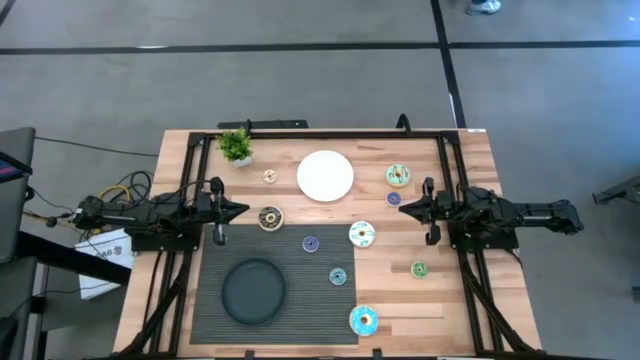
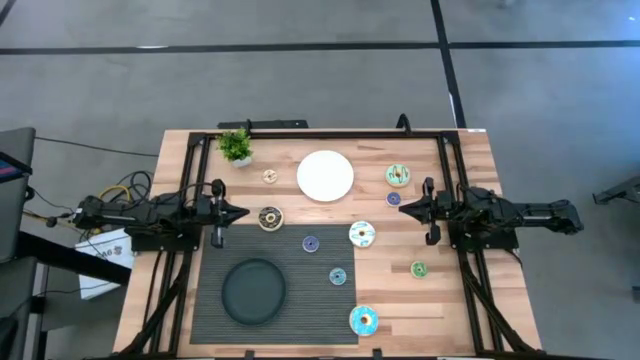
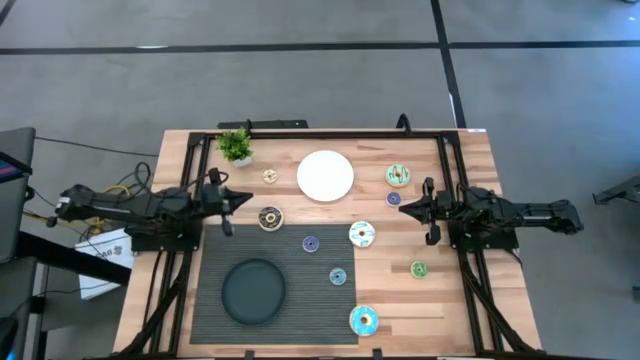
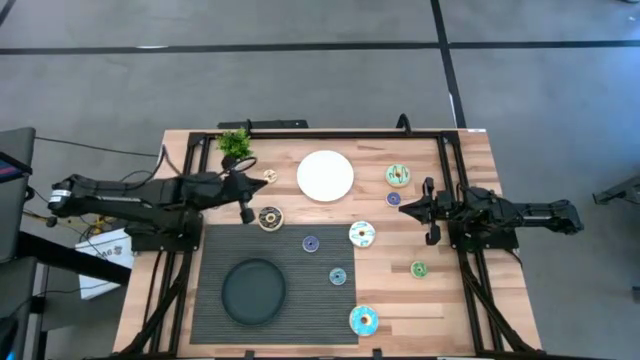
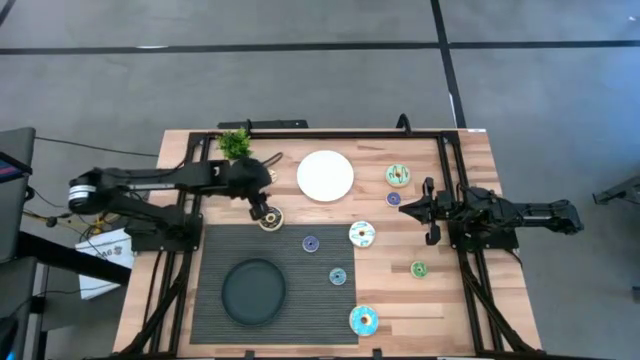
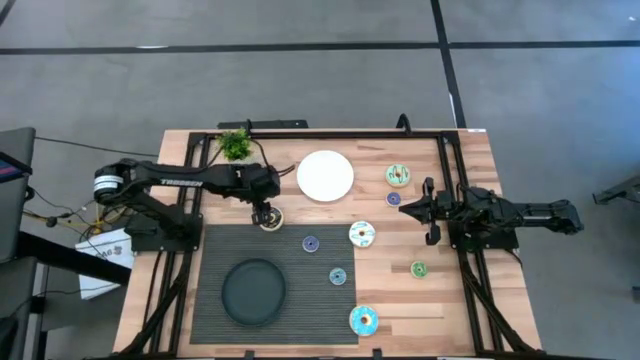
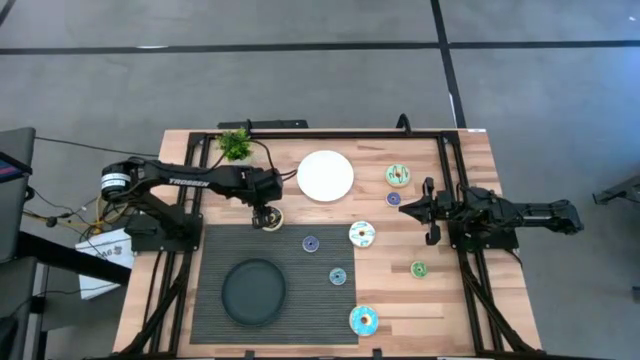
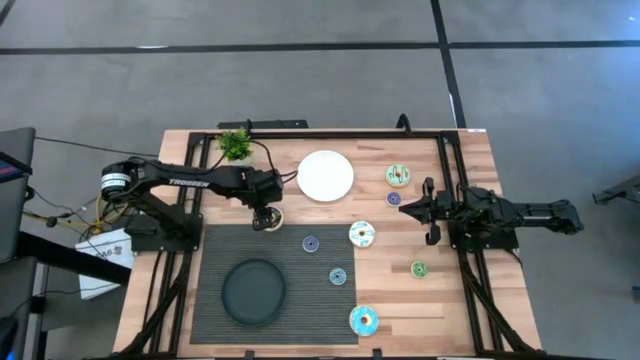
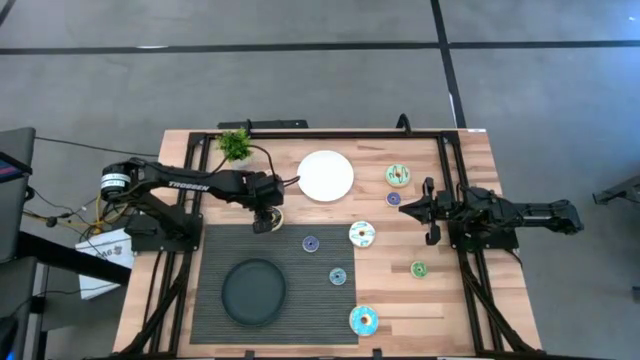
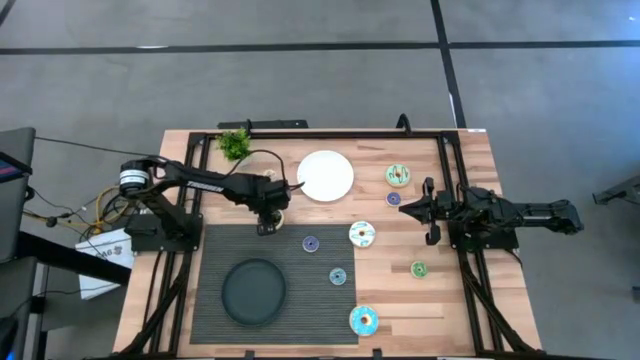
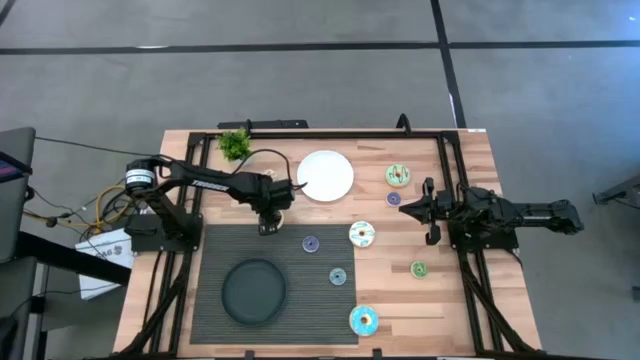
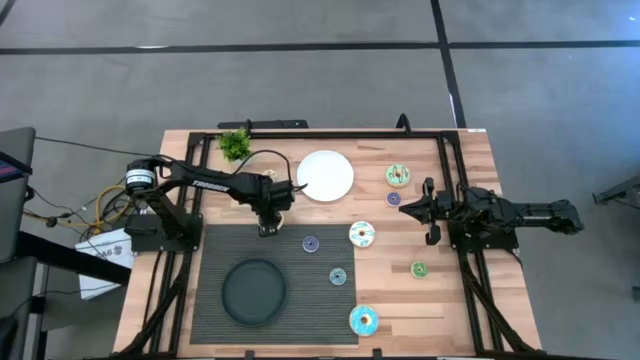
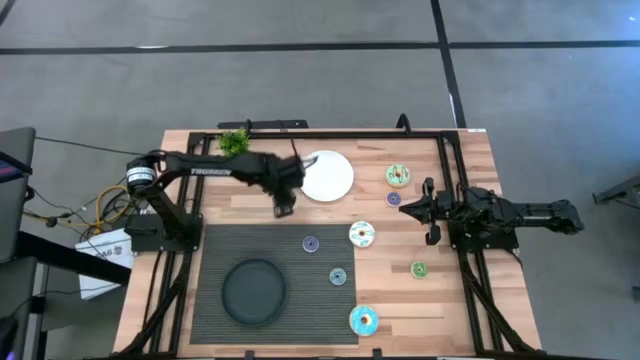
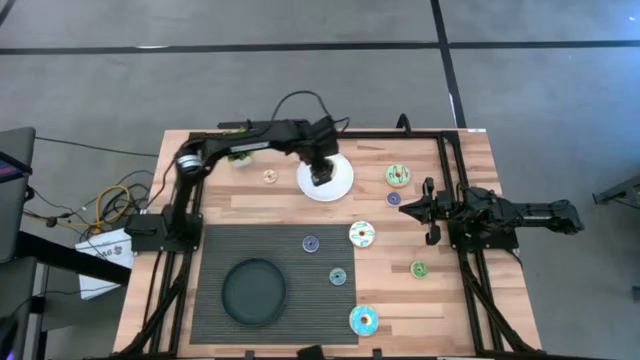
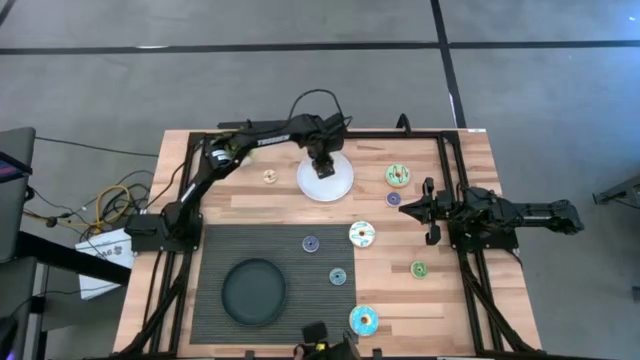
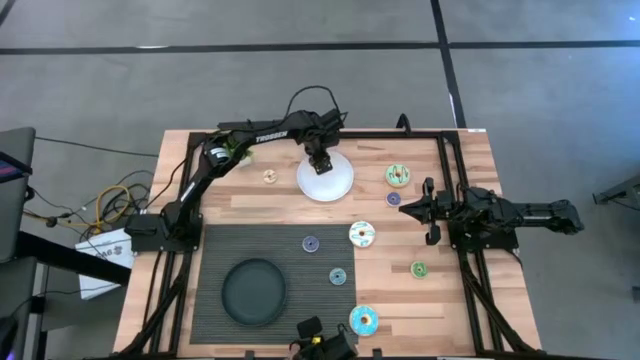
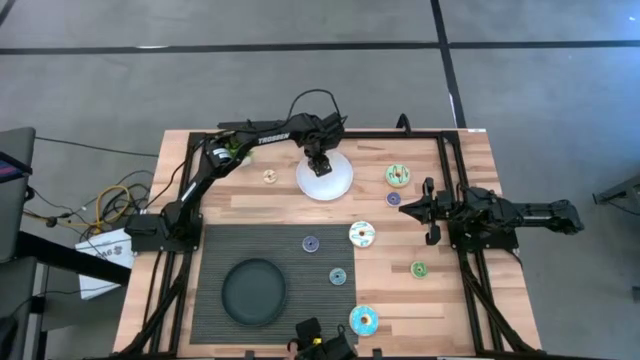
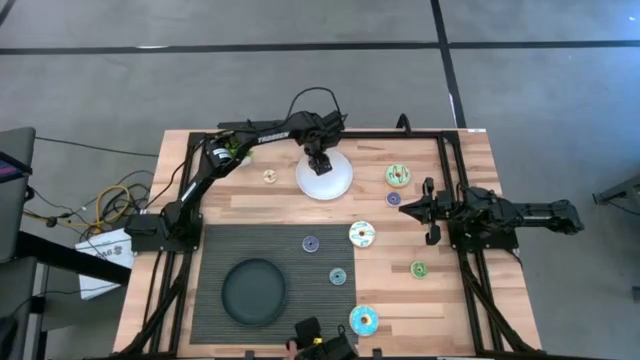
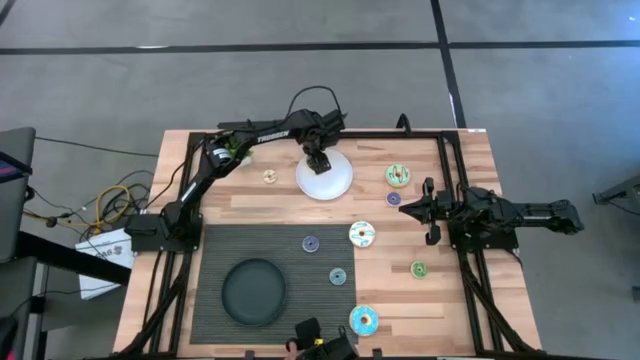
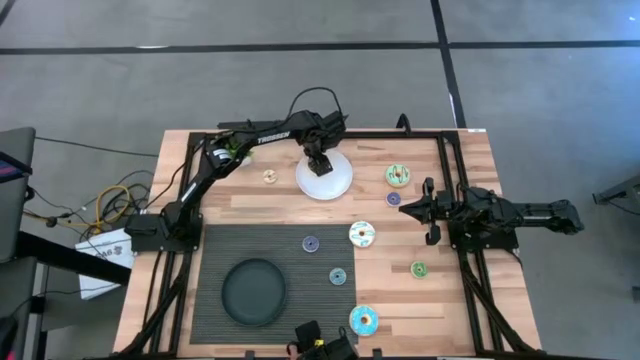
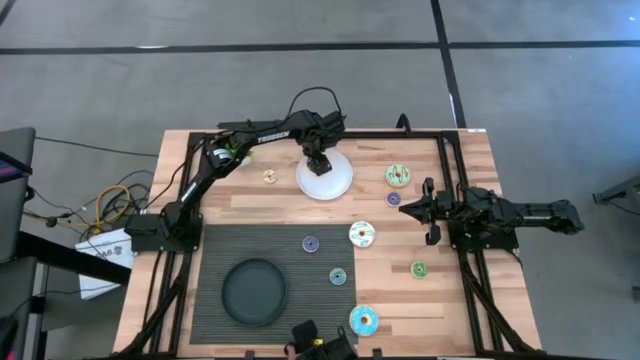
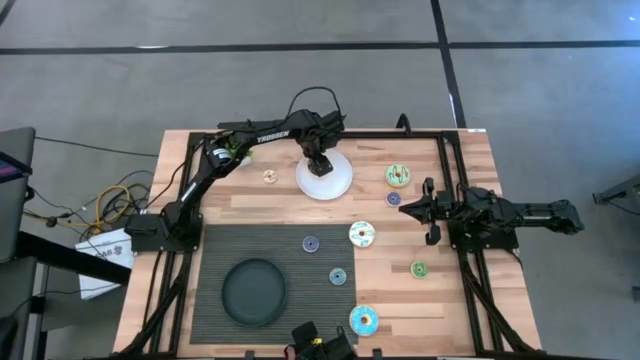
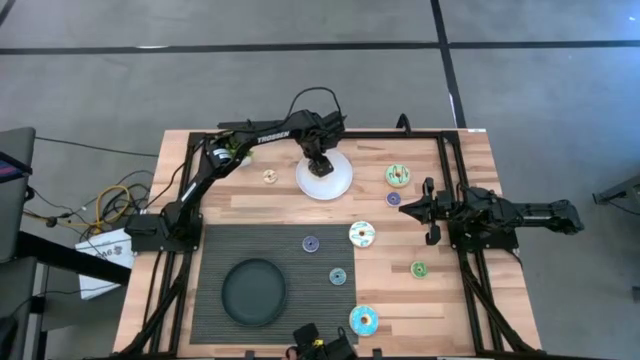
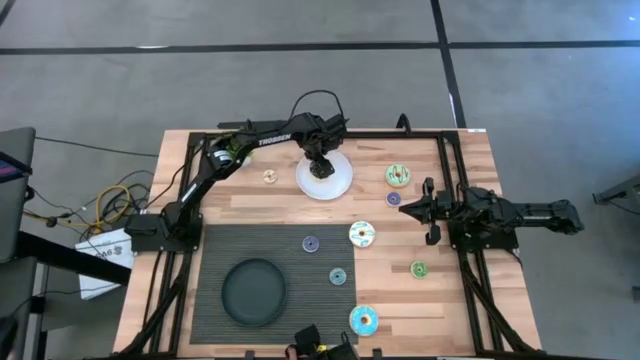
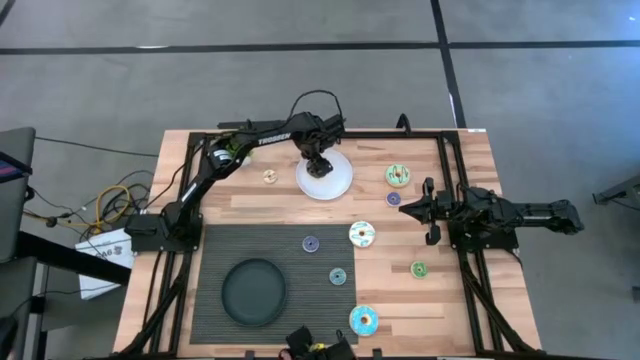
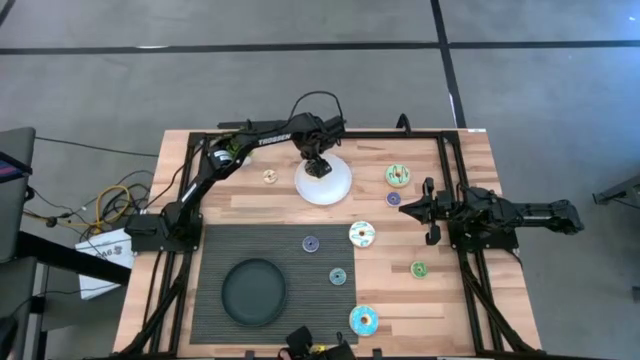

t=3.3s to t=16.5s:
Task: Pick & Place donuts
Put the large black donut on the white plate

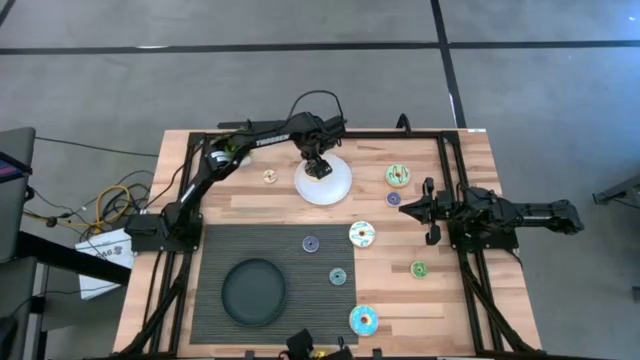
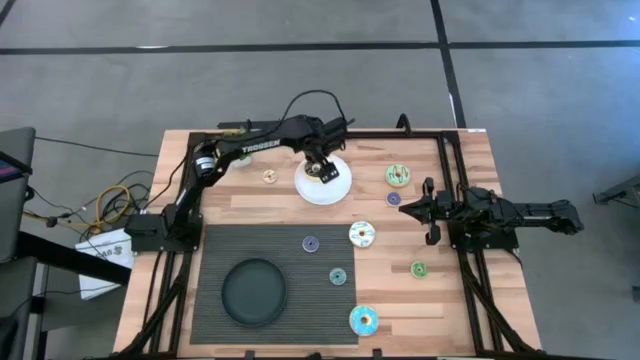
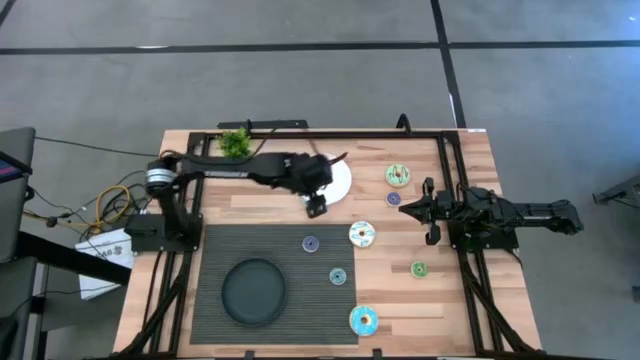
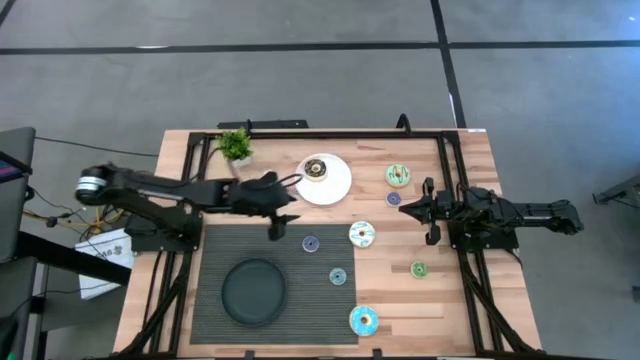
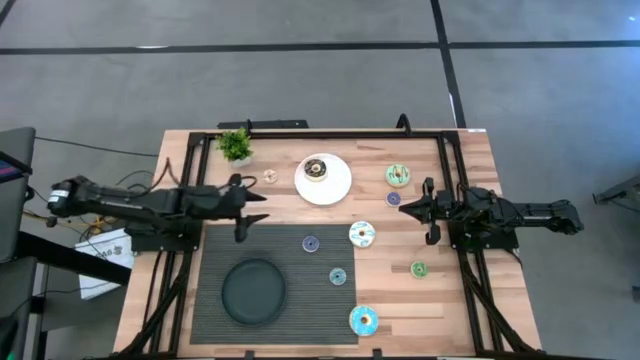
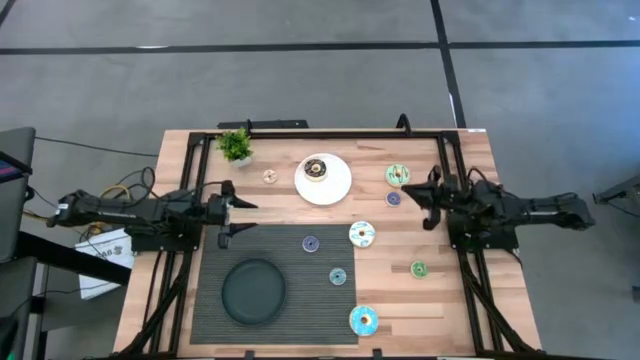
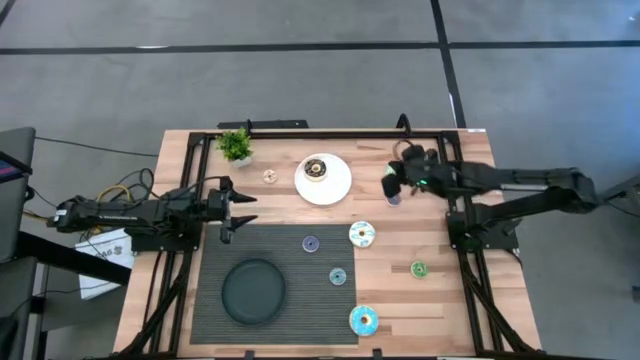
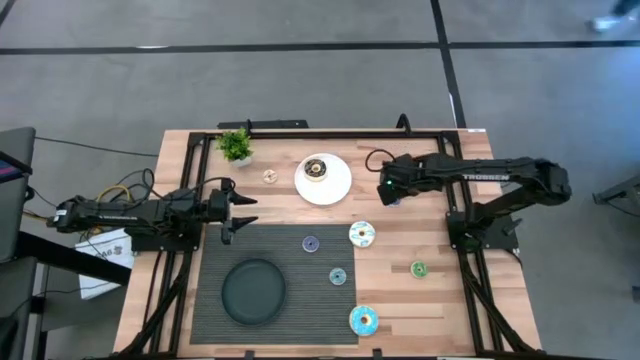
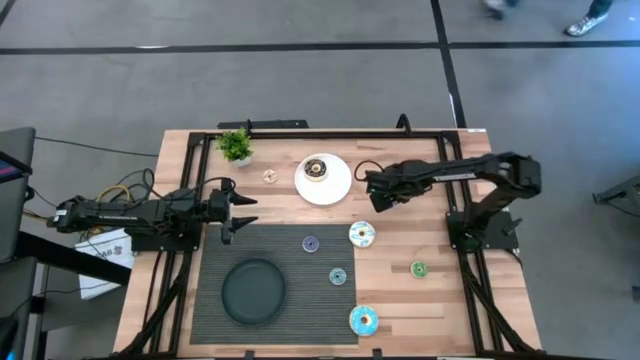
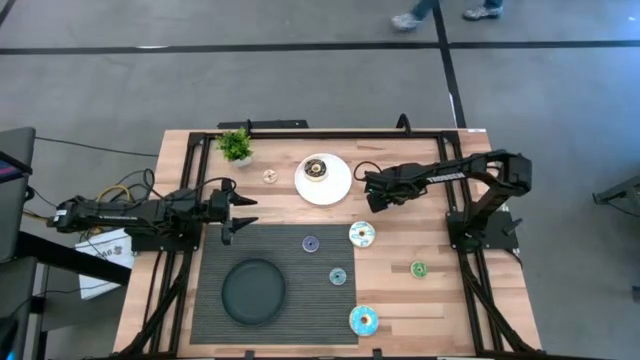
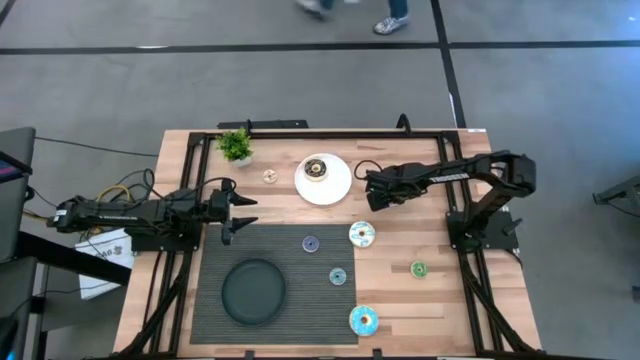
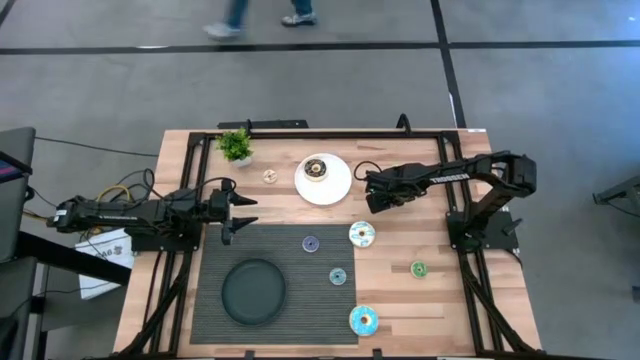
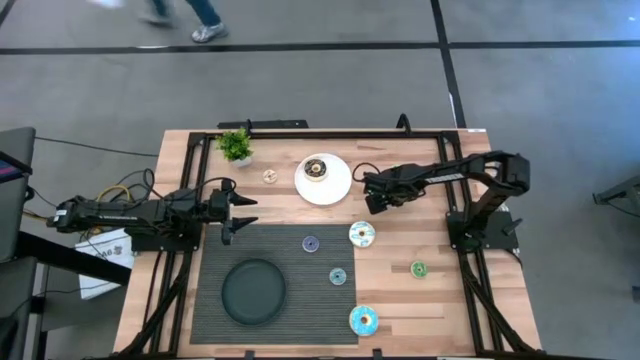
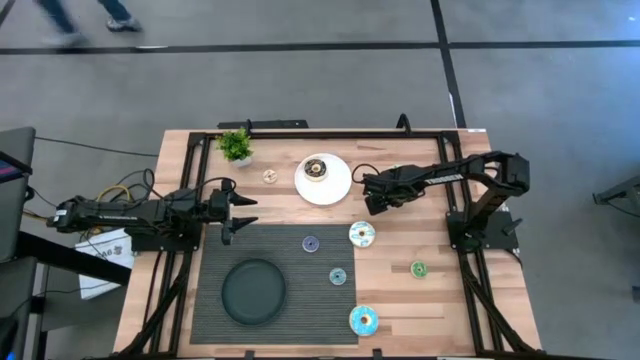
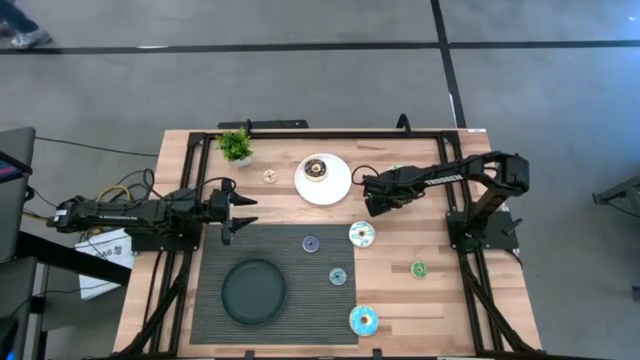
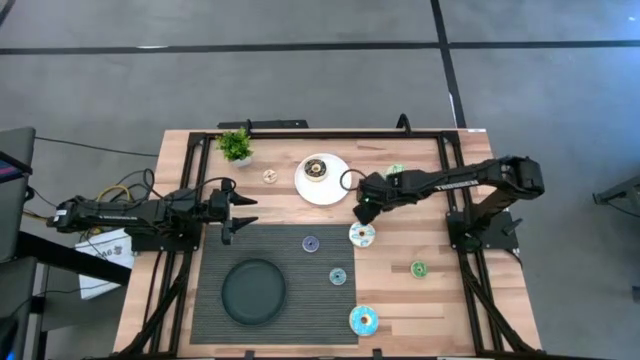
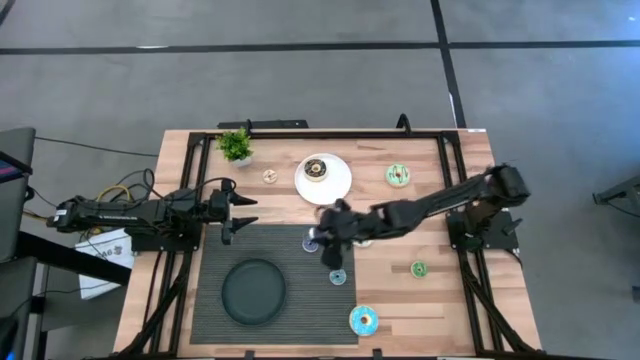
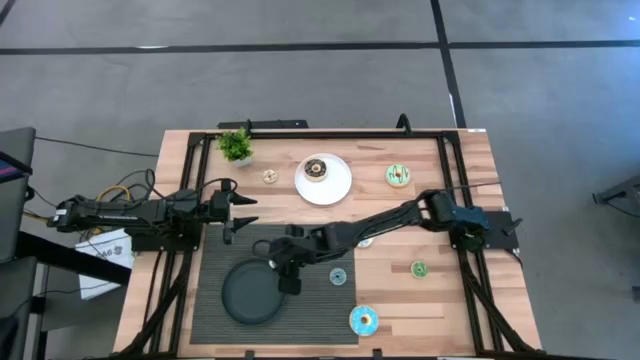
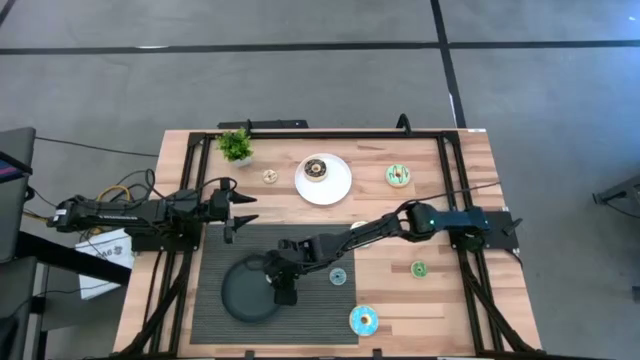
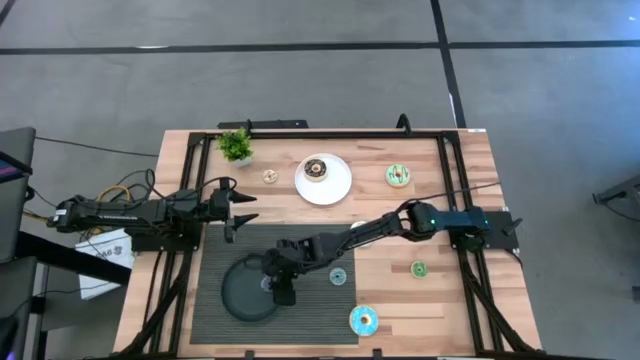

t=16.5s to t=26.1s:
Put the right small purple donut on the black plate
